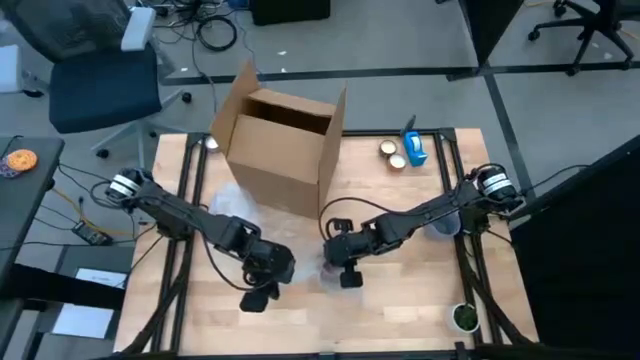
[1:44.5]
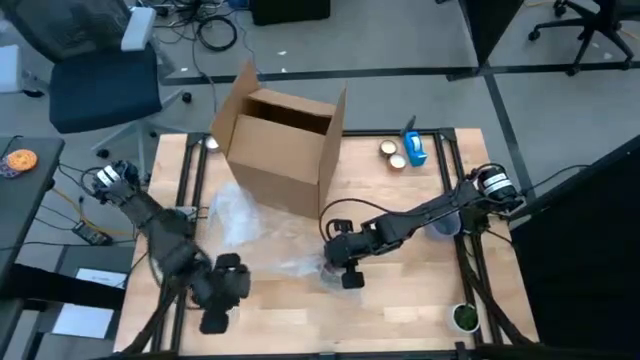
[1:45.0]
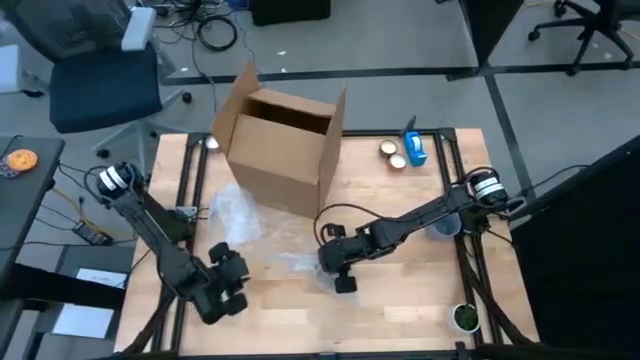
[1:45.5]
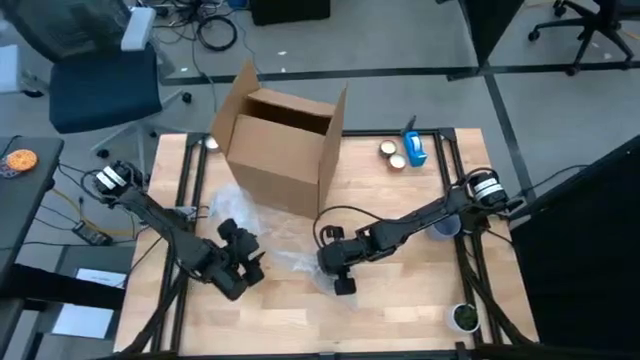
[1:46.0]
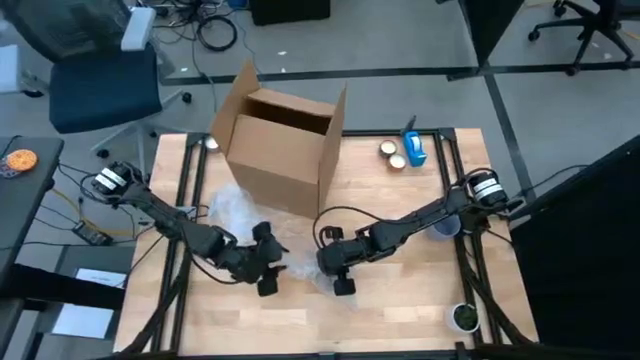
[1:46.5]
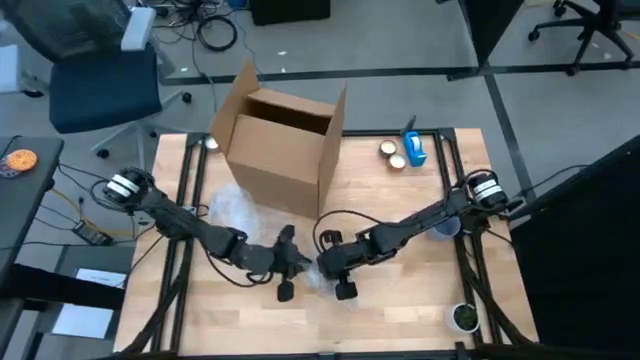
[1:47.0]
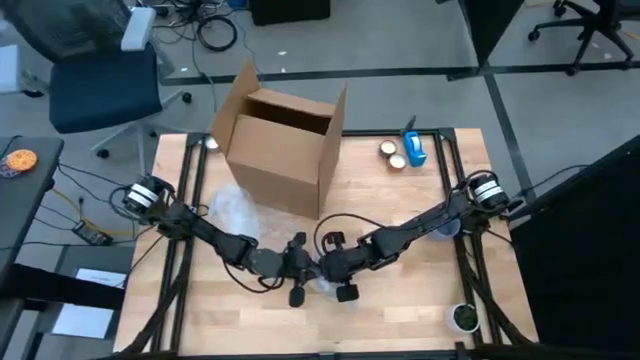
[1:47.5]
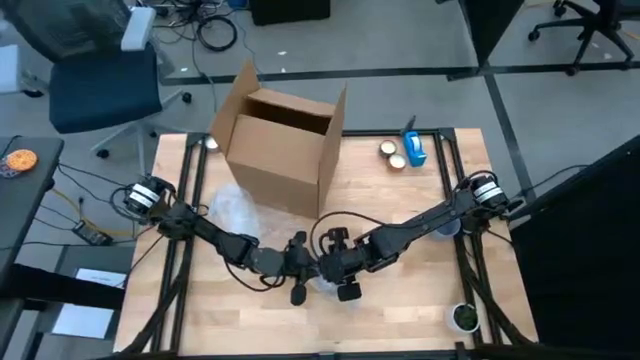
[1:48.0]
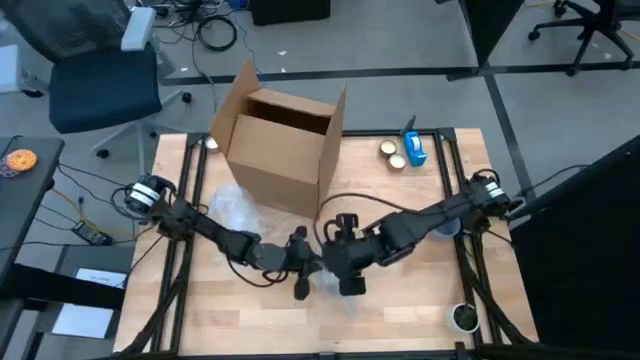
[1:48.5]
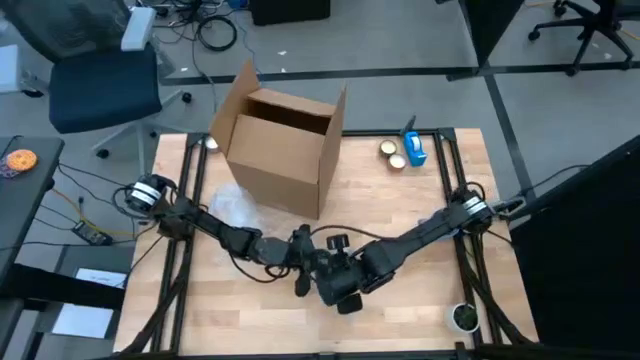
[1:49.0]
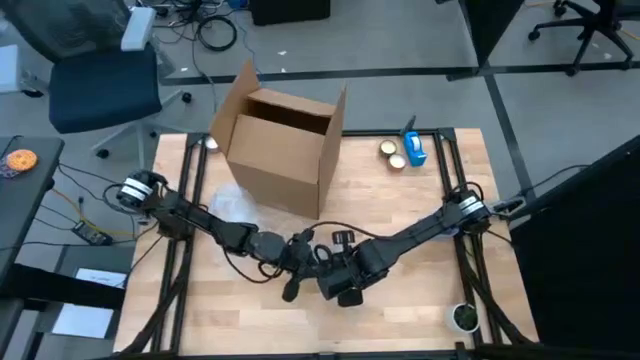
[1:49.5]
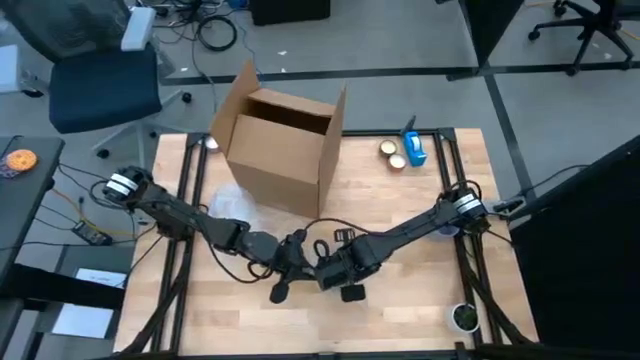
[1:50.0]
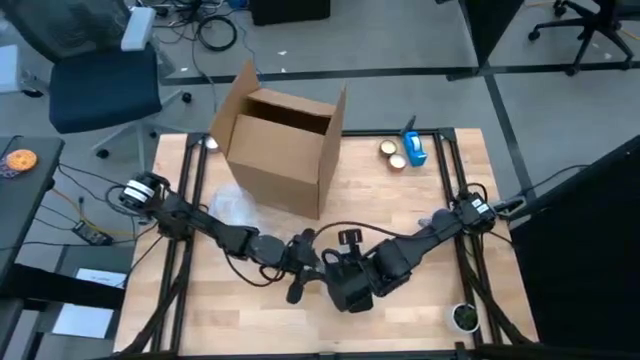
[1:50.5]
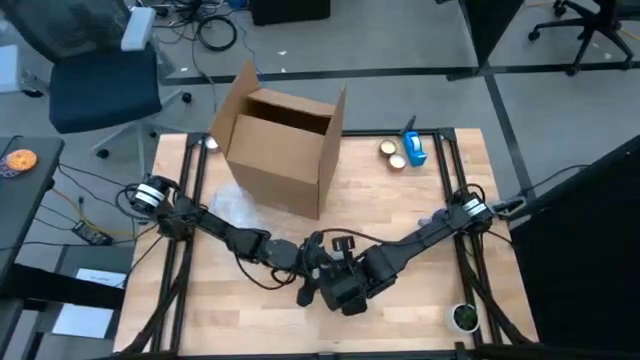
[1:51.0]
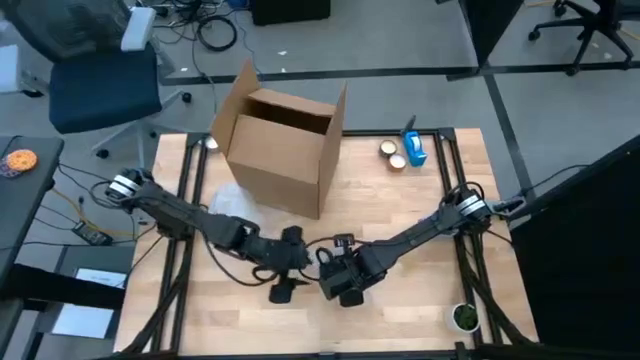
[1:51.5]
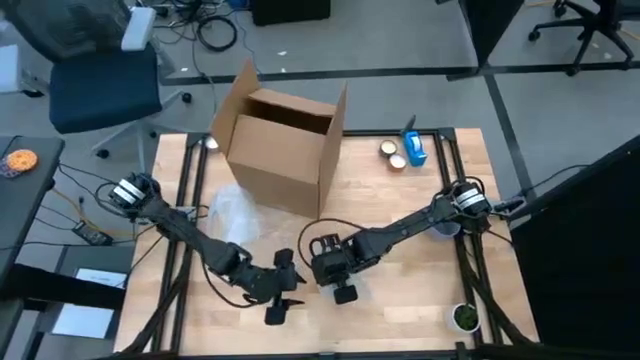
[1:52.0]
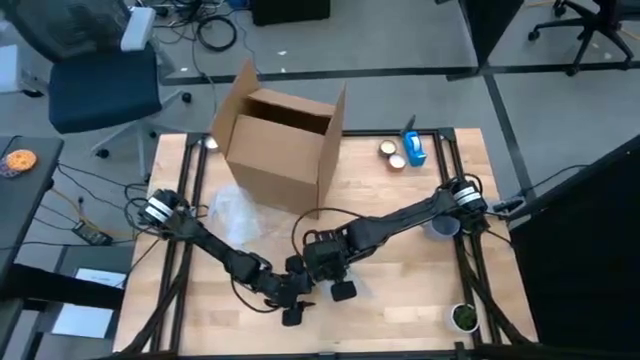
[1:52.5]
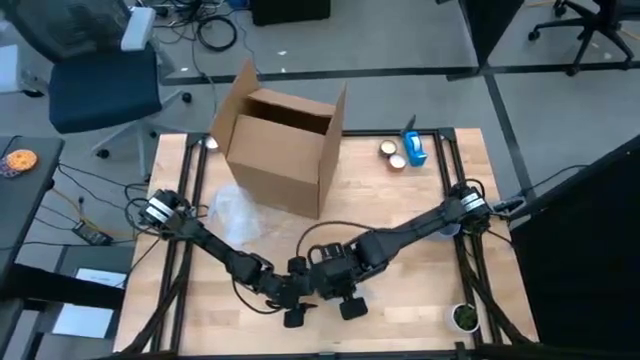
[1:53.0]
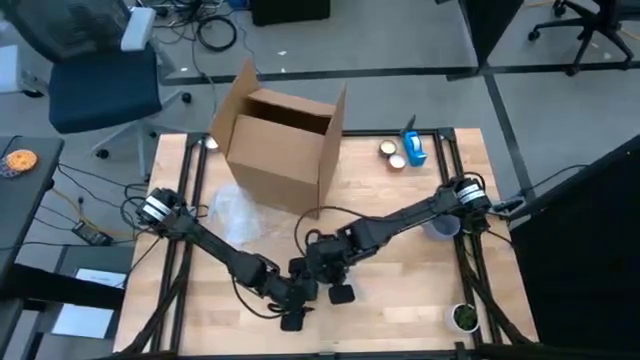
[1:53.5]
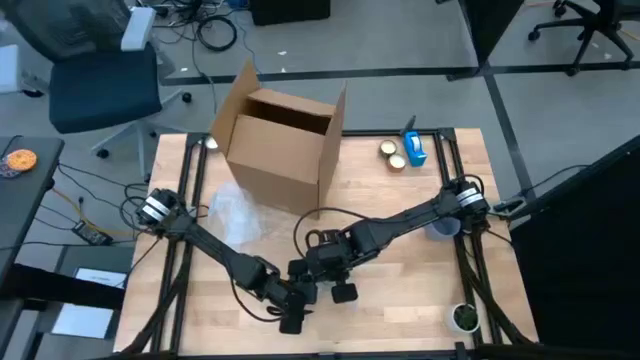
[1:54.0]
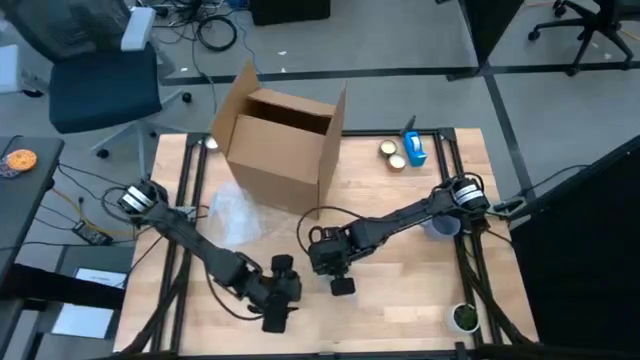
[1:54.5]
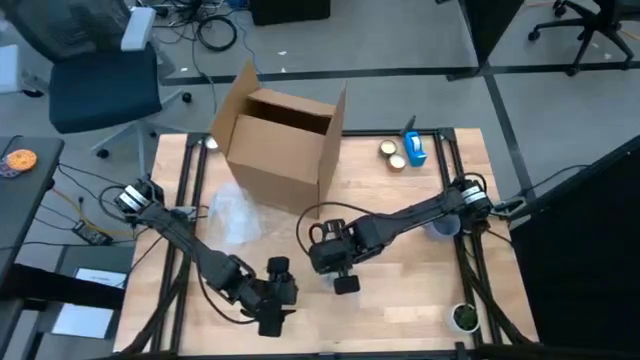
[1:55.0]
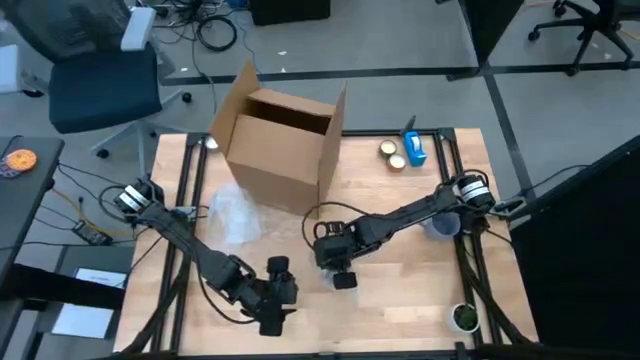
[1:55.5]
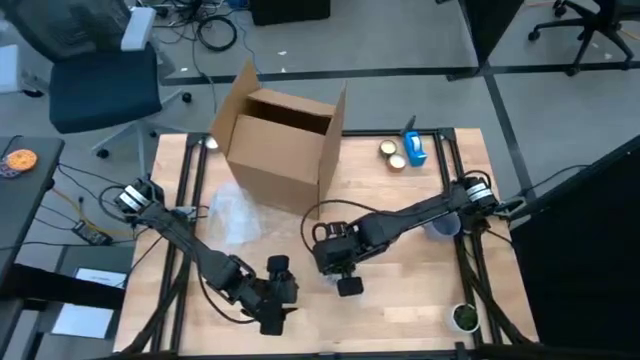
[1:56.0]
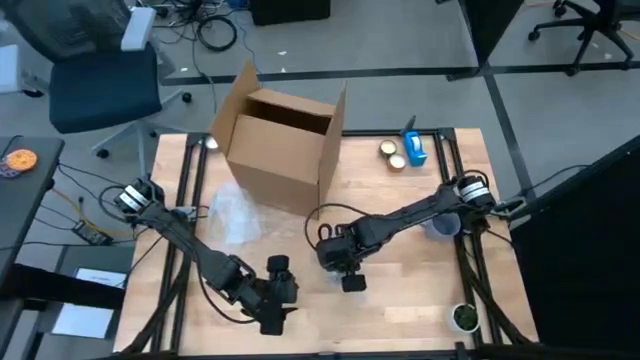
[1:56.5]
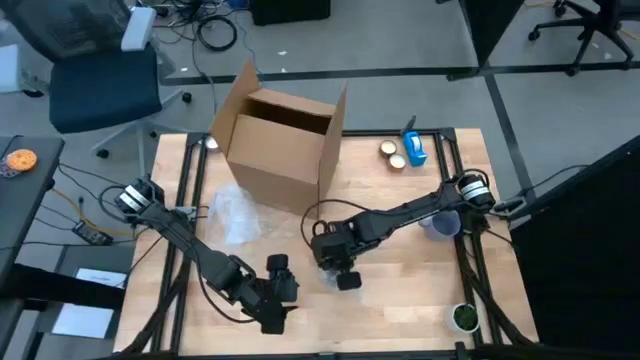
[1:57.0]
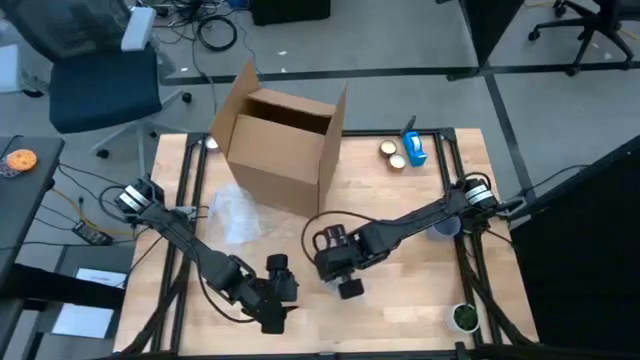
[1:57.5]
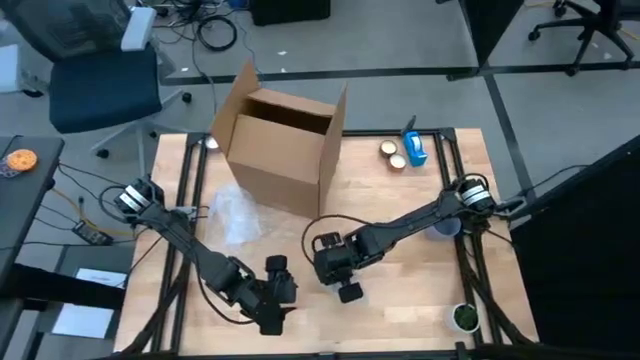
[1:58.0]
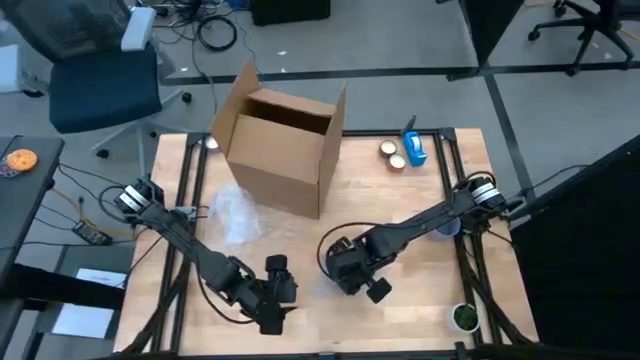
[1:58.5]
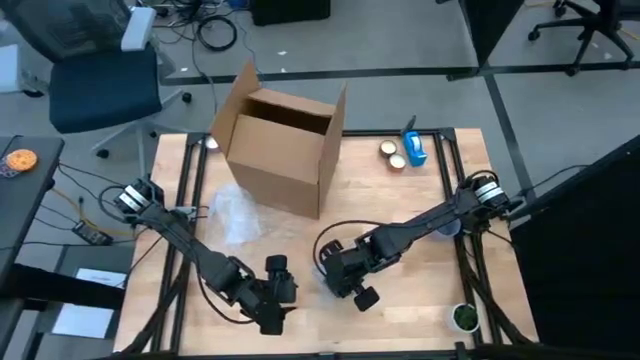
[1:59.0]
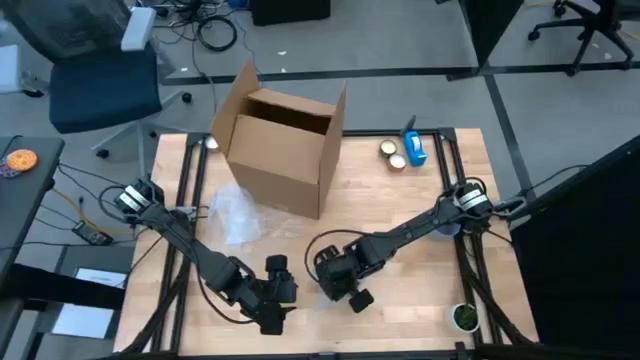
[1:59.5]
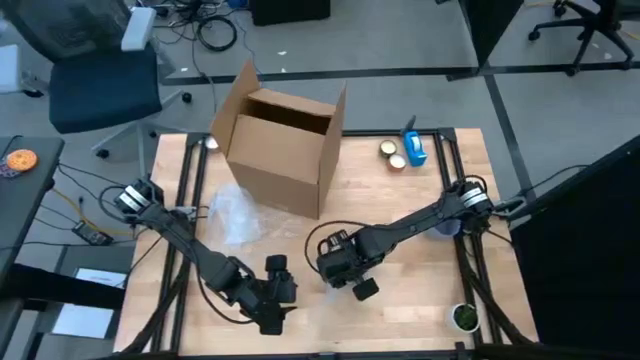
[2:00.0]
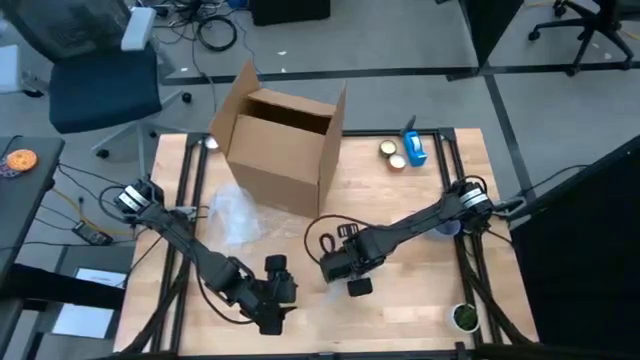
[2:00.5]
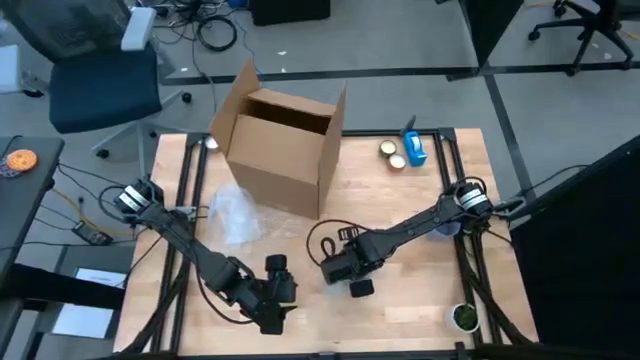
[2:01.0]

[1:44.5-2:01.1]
Task: wrap mug
Wrap the orange mug with bubble wrap

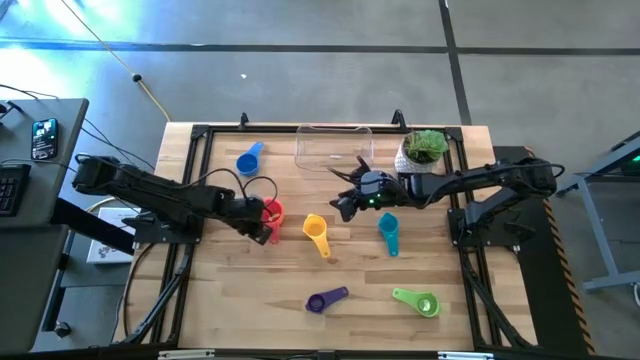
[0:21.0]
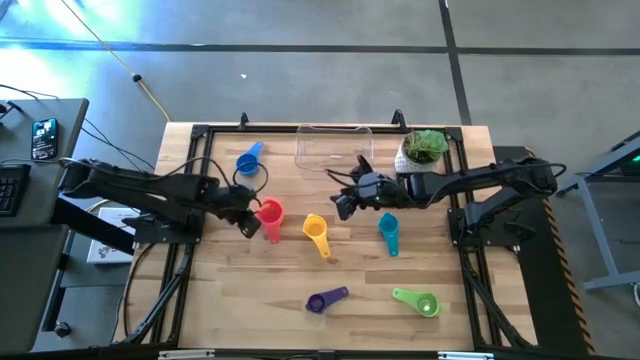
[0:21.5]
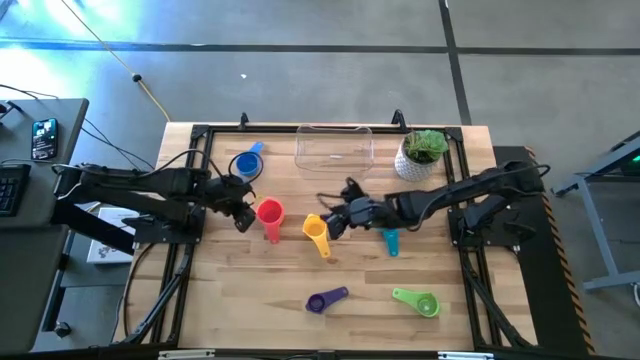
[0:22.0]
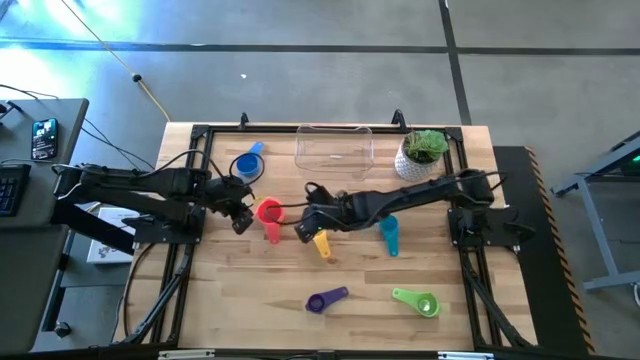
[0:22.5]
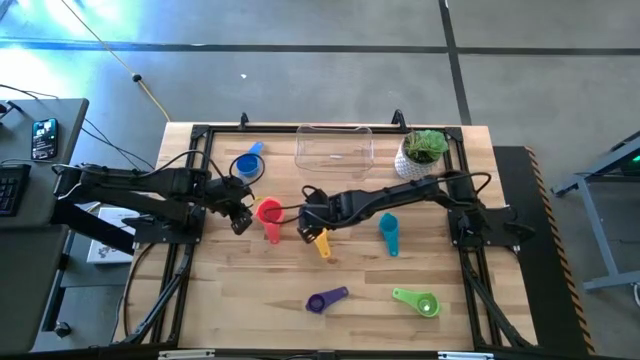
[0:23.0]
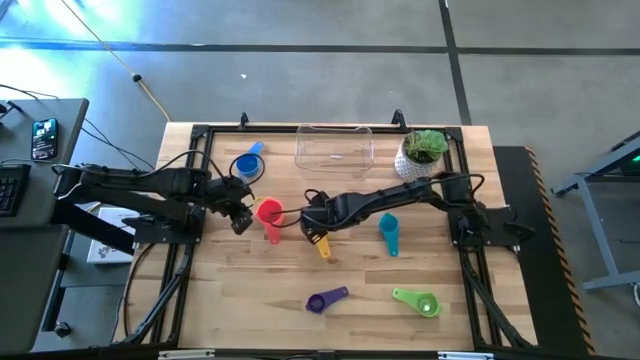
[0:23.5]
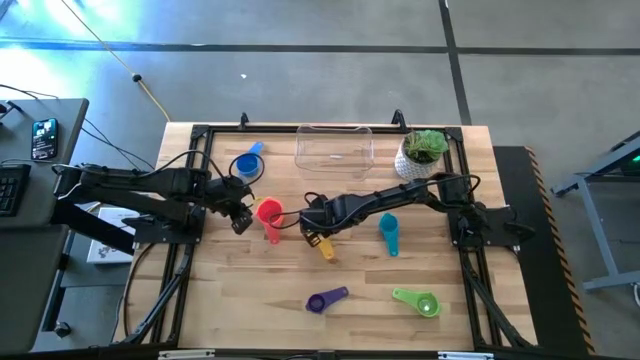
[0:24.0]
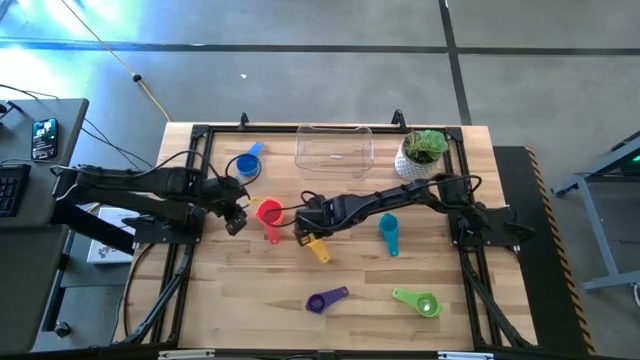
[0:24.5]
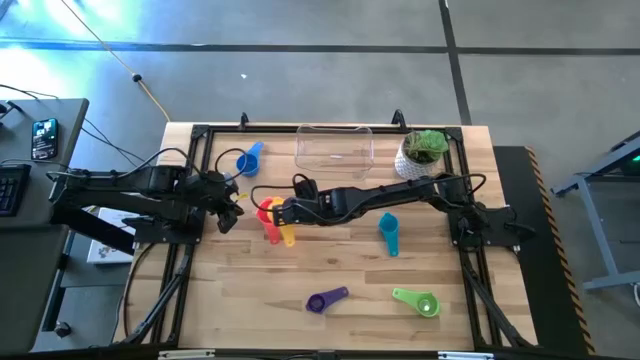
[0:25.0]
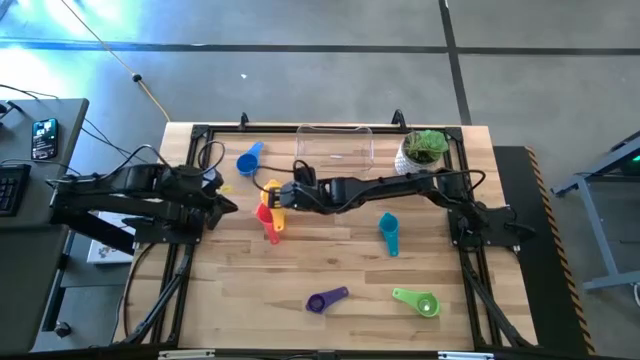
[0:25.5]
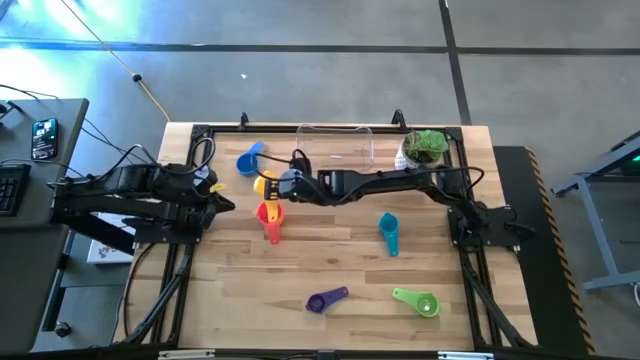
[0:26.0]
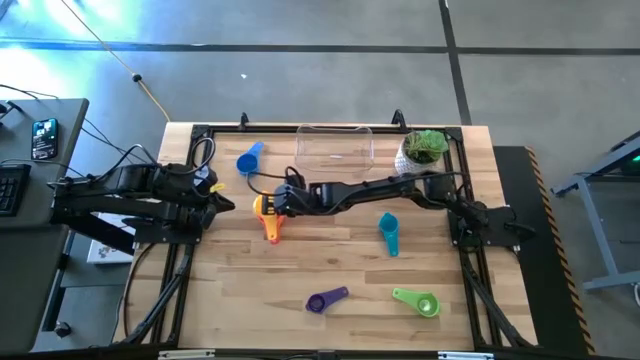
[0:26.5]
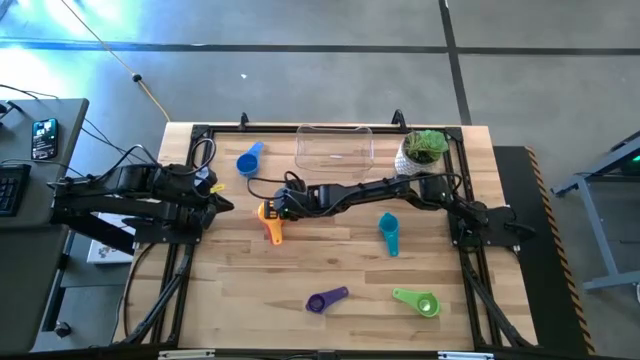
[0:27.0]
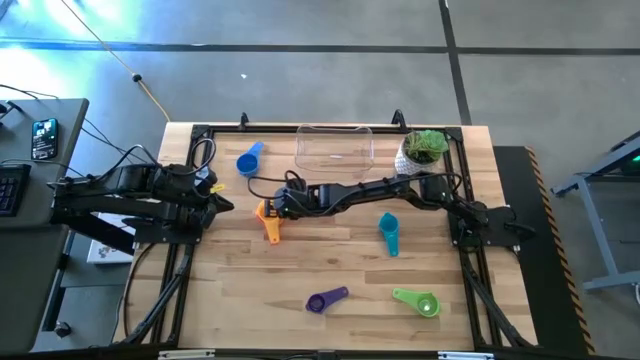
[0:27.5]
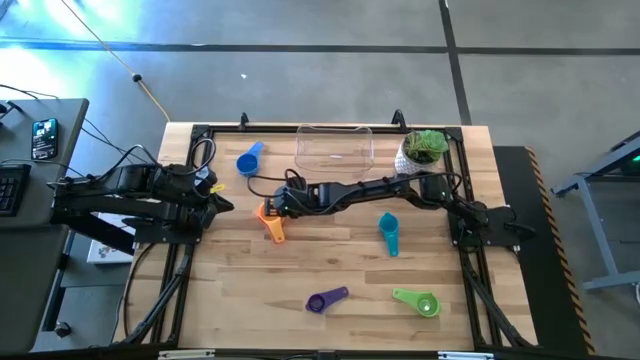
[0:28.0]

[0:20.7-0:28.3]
Task: Nest measuring cups in basket
Stack the yellow measuring cup on the top of the red measuring cup
